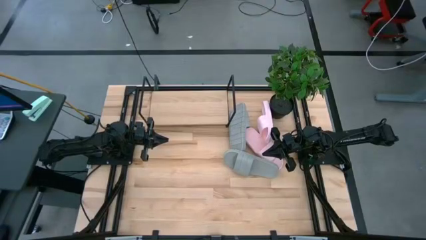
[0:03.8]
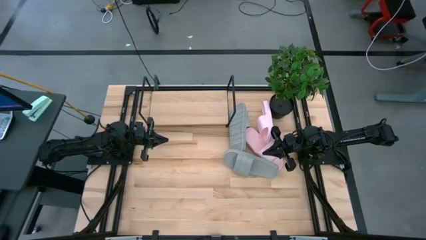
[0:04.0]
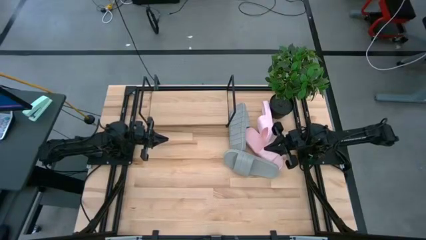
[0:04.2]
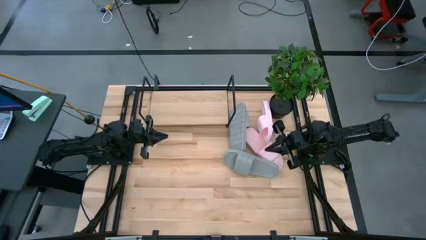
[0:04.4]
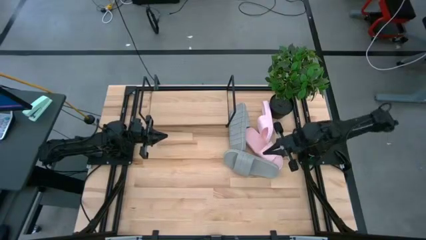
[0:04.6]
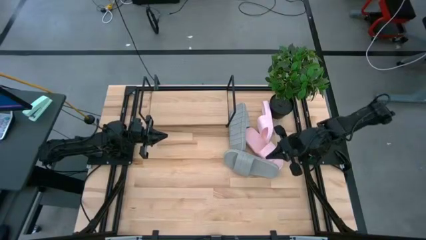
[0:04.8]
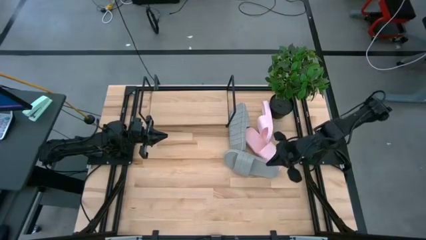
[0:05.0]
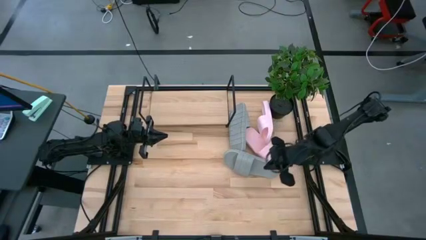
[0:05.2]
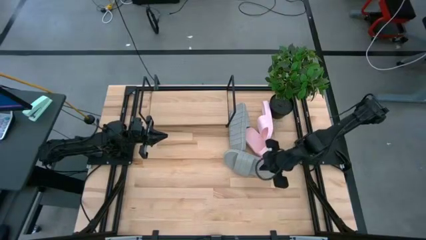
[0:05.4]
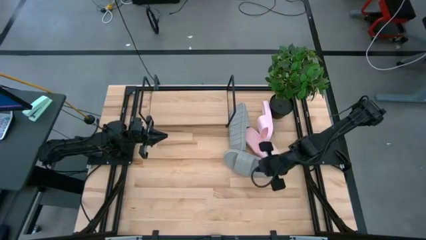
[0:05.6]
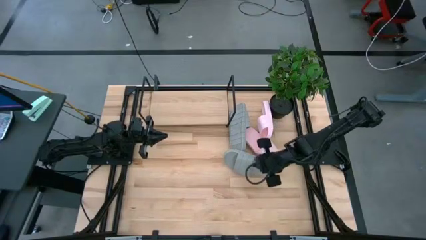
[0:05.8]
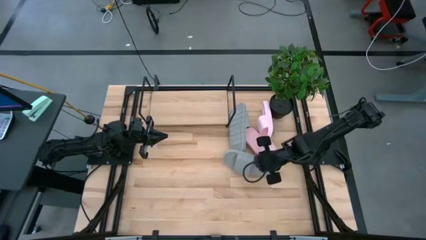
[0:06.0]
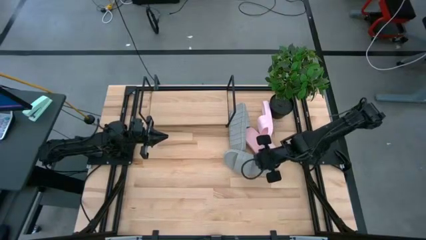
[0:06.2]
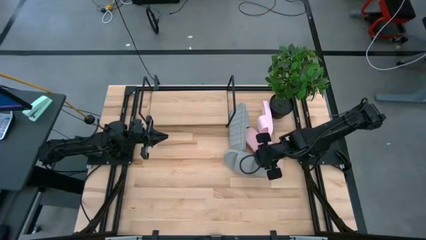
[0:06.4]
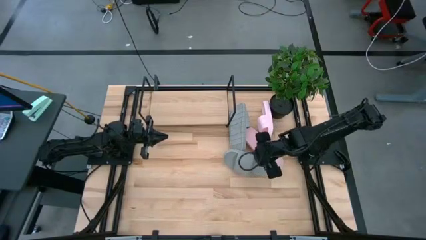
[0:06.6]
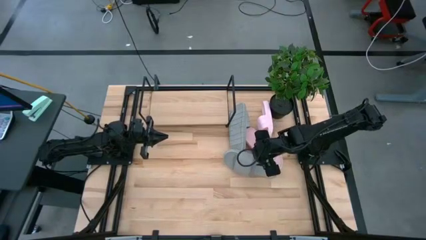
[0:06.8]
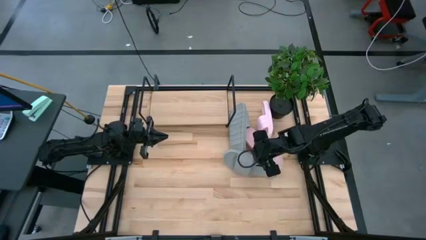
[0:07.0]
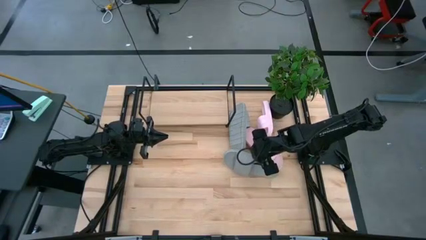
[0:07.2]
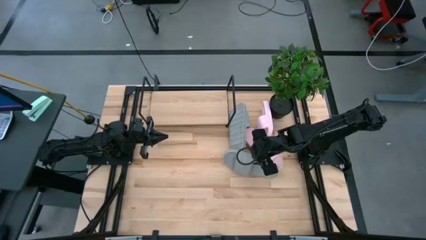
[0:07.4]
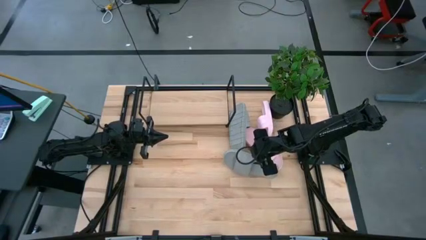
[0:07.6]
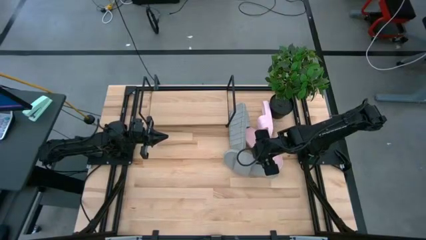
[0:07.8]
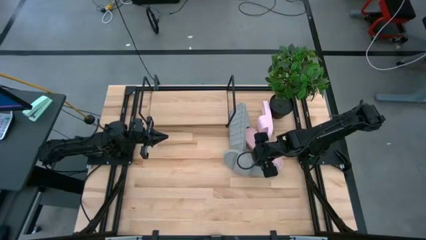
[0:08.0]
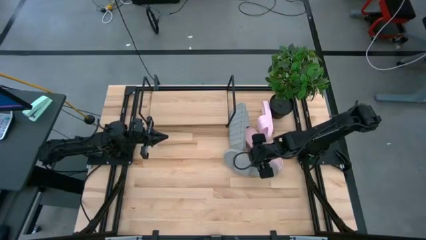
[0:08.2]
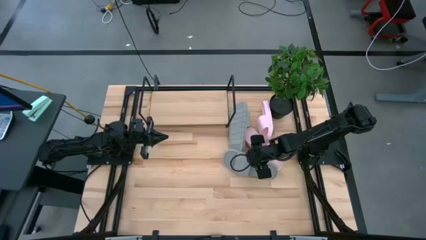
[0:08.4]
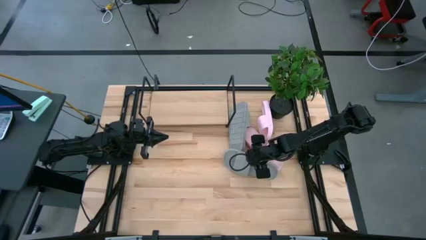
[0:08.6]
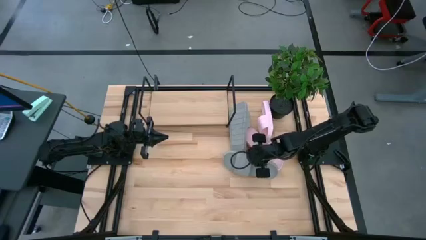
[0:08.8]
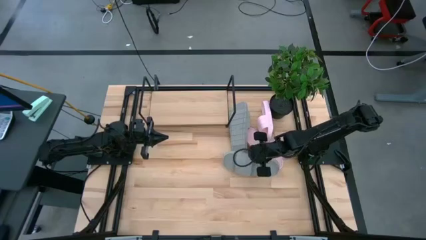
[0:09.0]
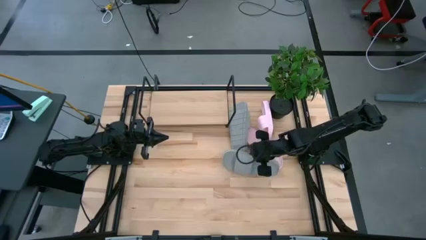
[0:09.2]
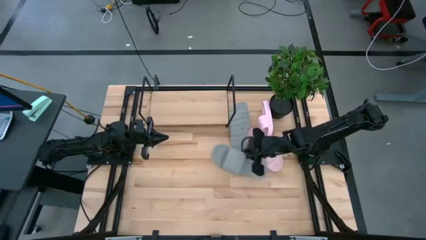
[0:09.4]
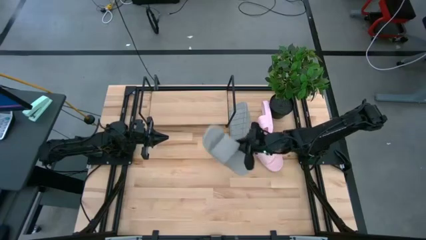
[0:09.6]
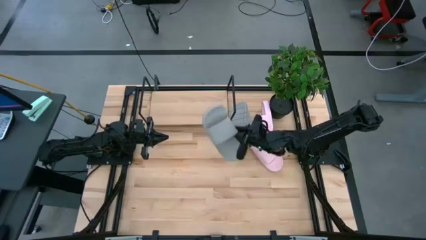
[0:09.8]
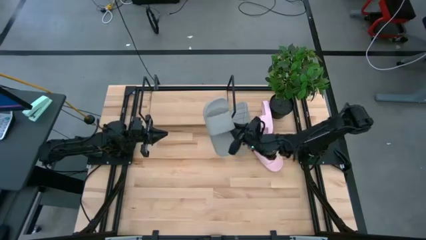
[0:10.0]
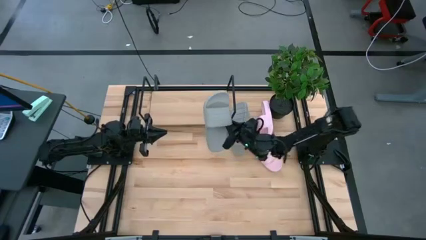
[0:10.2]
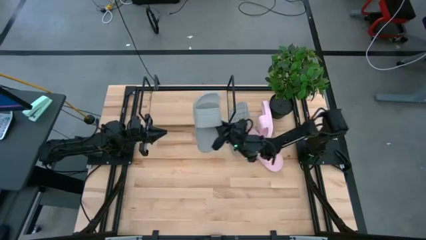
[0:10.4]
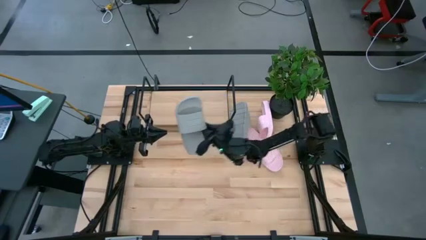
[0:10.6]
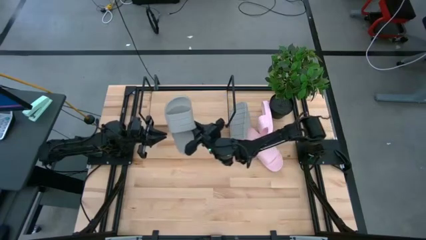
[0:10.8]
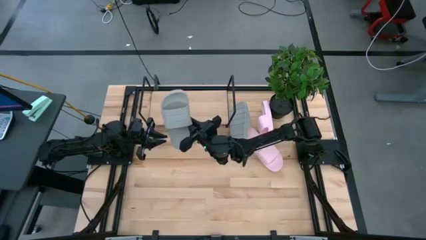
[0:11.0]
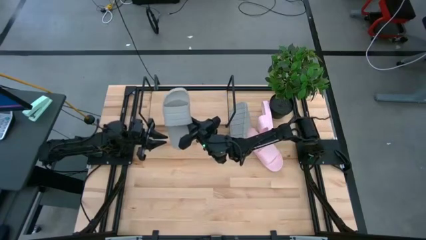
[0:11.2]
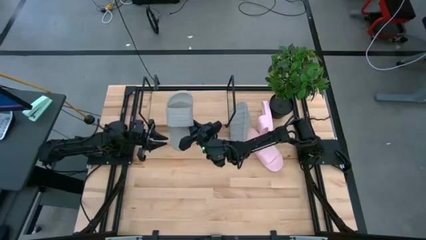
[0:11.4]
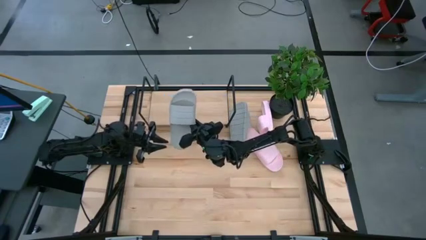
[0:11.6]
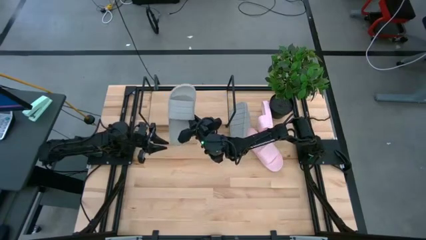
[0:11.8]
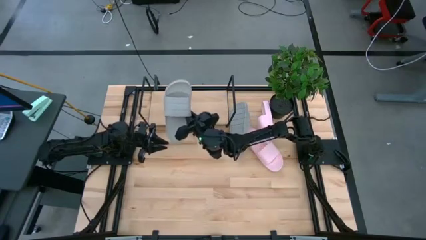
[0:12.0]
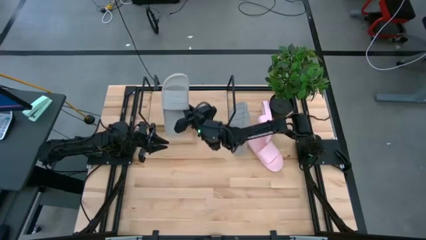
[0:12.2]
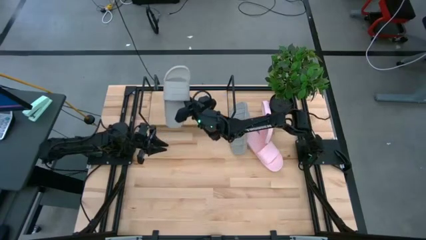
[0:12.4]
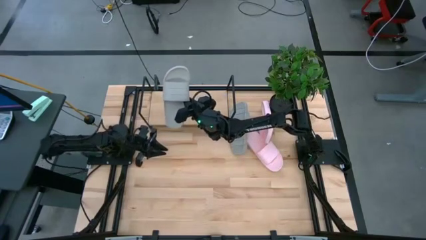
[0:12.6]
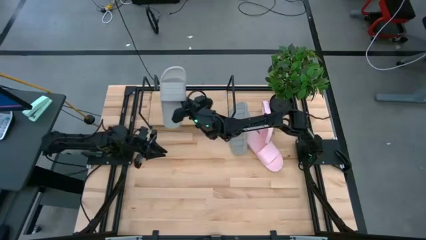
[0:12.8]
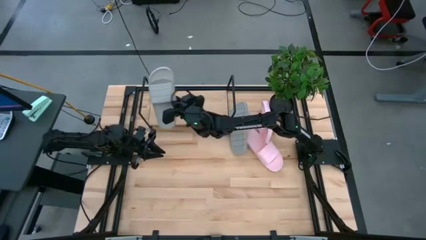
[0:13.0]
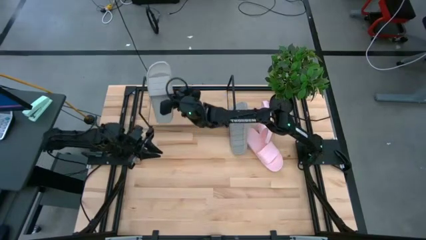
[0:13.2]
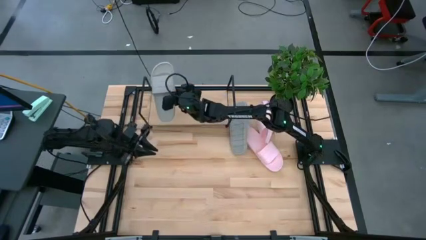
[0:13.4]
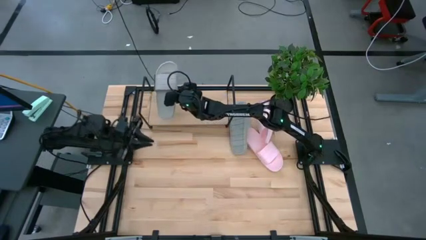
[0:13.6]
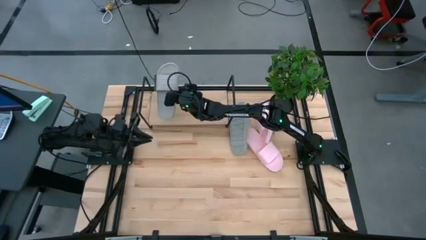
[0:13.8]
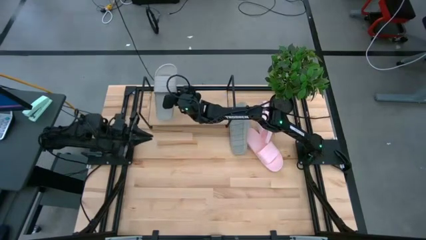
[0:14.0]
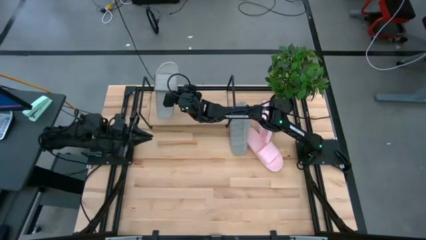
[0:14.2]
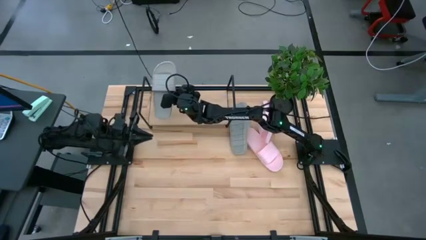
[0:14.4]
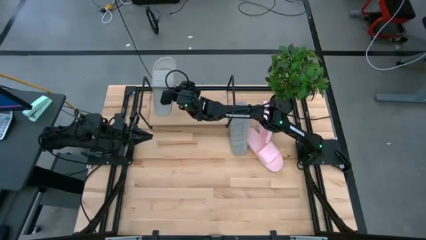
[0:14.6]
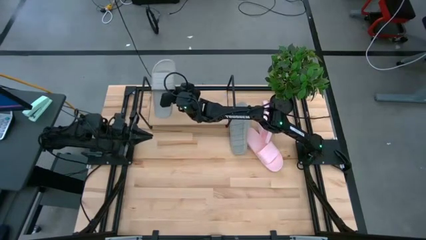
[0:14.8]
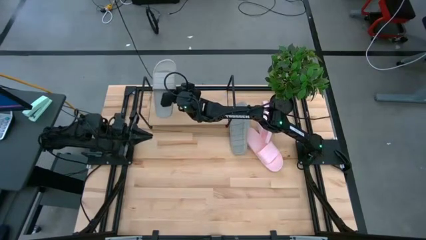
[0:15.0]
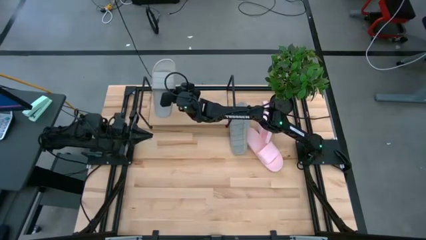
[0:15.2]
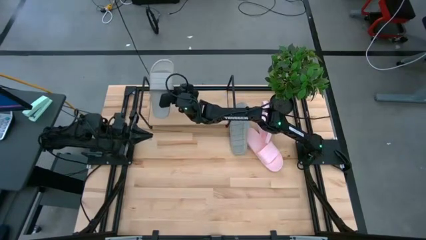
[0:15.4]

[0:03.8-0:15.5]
Task: Pick and place slides into the shelf
Put the bottom gray slippers on the shelf

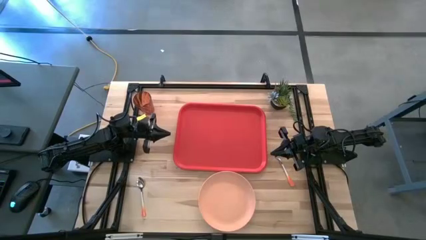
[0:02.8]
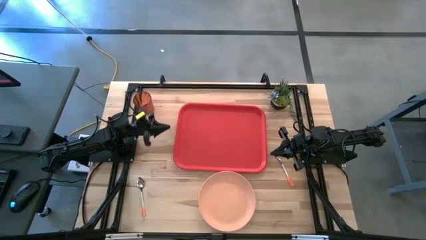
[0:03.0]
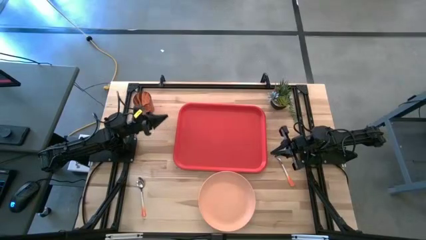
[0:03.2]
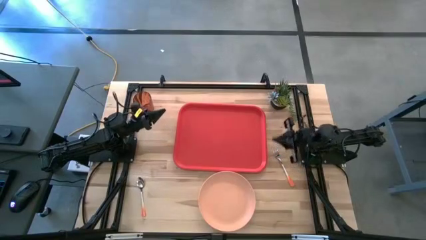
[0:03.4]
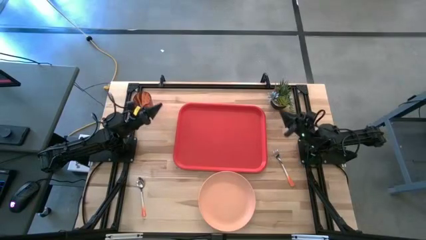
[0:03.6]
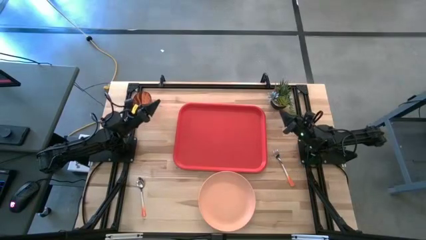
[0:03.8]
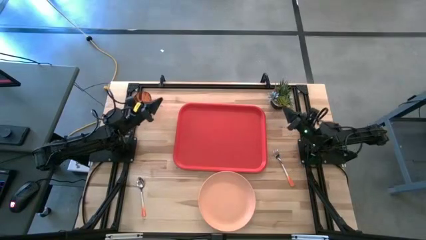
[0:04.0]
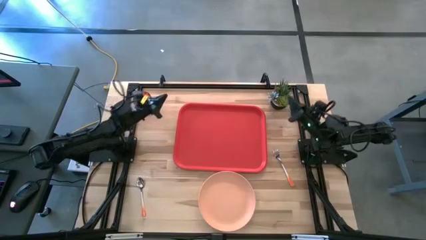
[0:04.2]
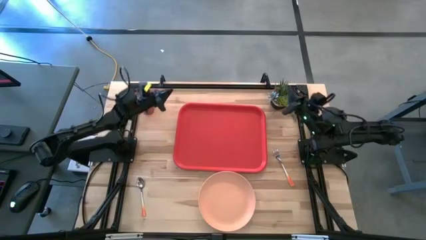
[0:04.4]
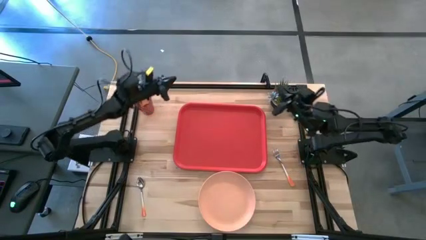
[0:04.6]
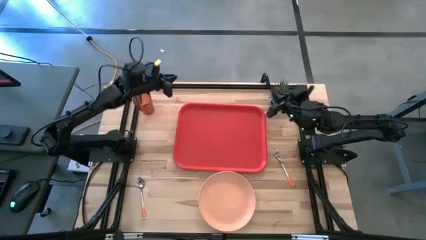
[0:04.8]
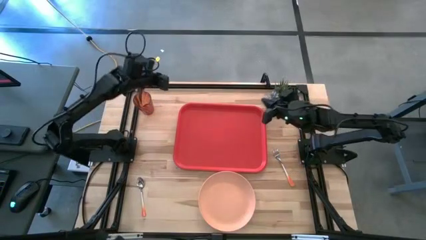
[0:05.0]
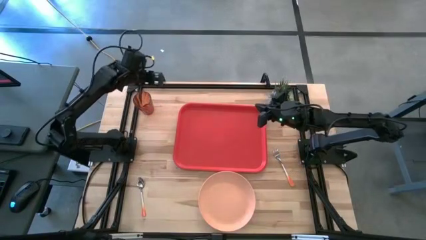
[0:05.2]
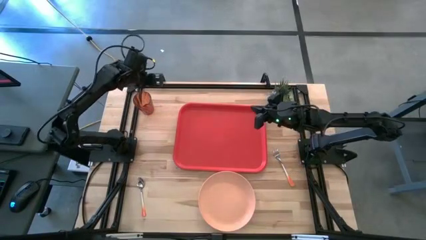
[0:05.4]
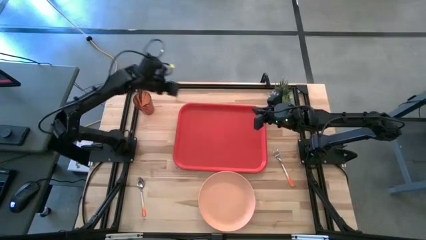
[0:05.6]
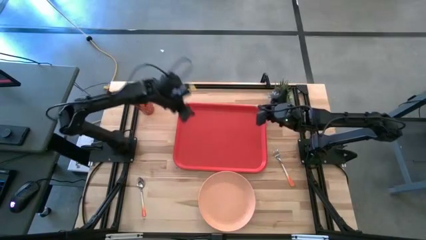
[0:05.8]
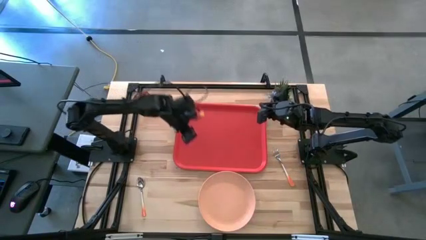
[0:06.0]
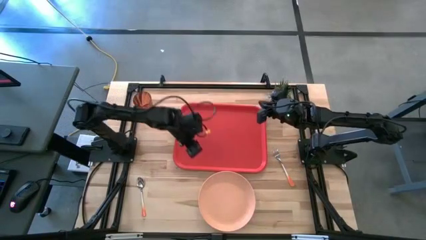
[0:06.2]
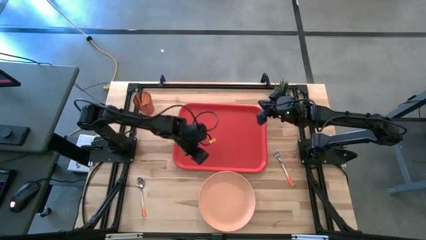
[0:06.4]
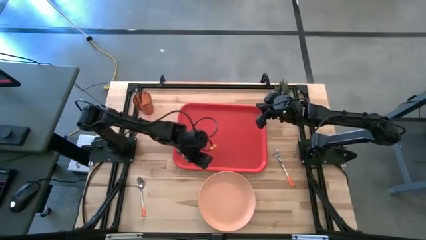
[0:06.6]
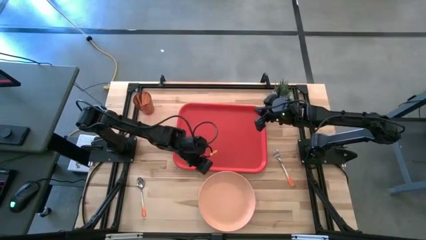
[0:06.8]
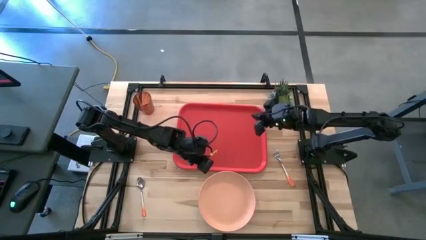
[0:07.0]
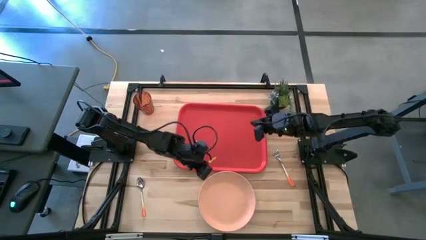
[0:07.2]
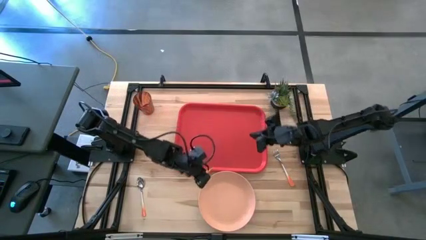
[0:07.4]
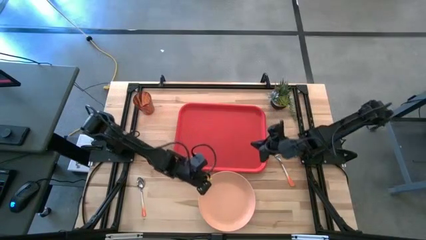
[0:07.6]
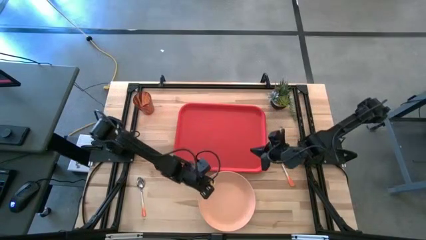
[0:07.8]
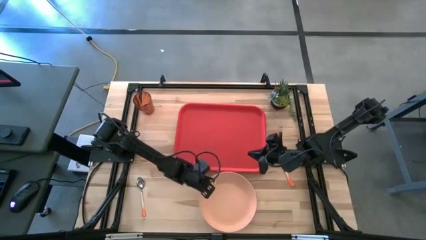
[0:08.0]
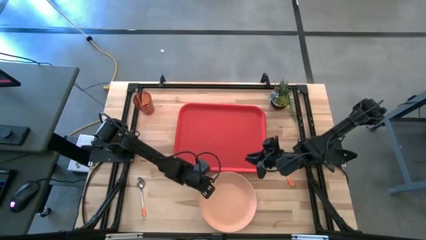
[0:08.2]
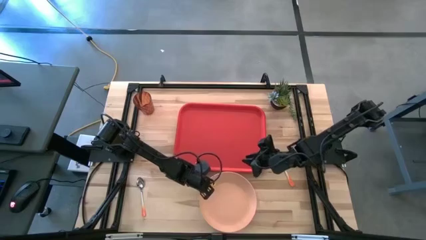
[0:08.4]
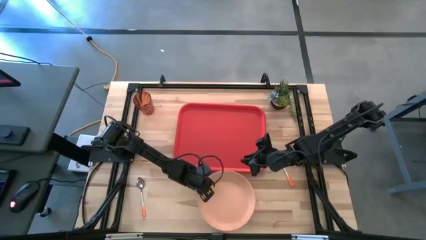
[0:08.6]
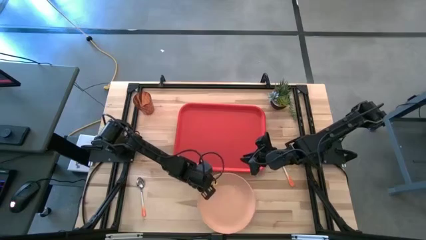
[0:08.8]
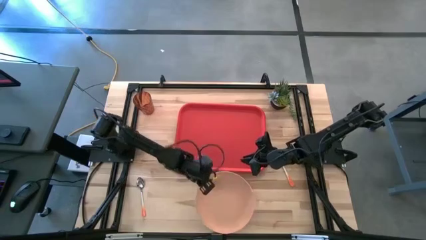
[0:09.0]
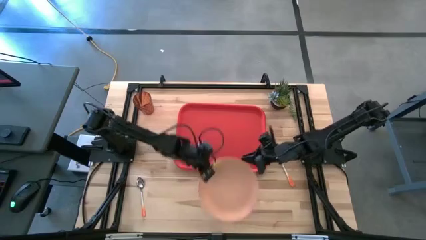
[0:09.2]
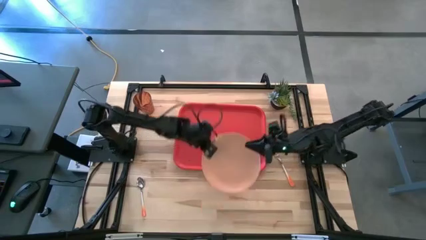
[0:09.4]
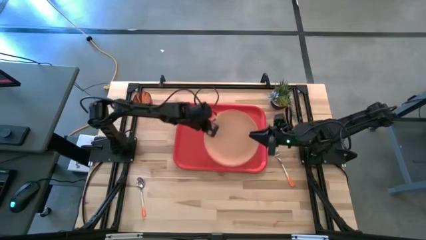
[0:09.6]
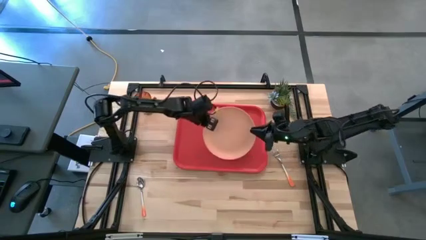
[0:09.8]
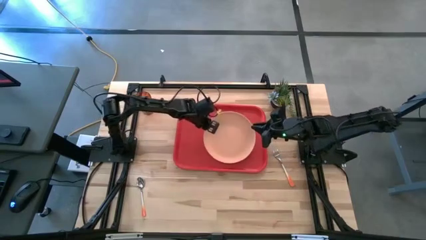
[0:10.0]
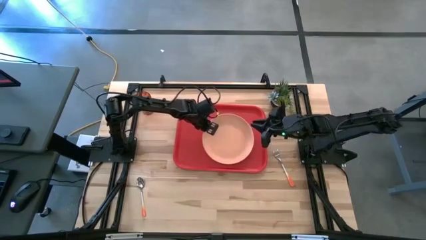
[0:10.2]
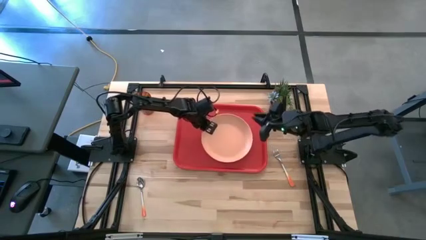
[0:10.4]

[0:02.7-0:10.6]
Task: Pick and place plate/cup/fork/spoon on tray
Put the light orange plate on the red tray
